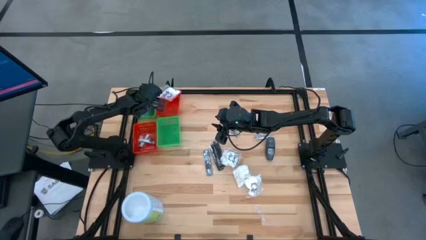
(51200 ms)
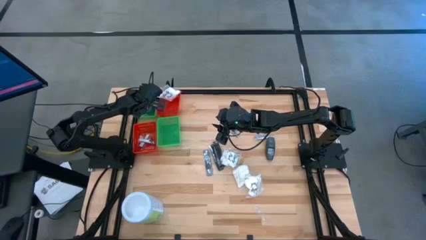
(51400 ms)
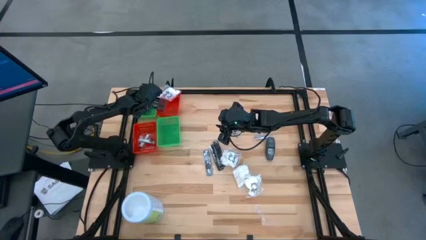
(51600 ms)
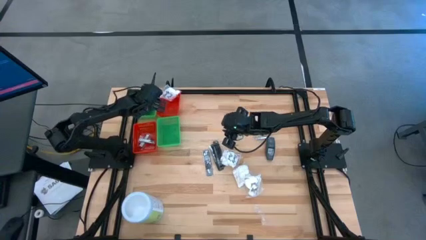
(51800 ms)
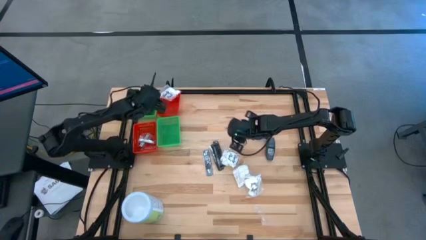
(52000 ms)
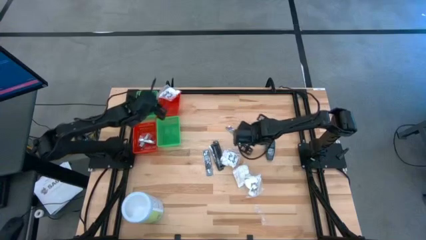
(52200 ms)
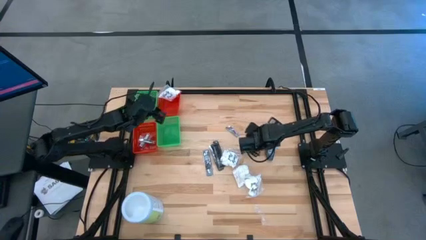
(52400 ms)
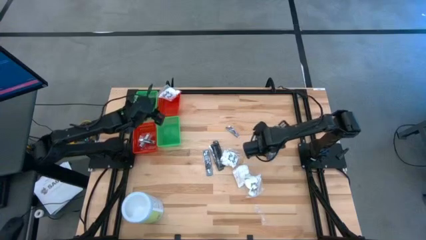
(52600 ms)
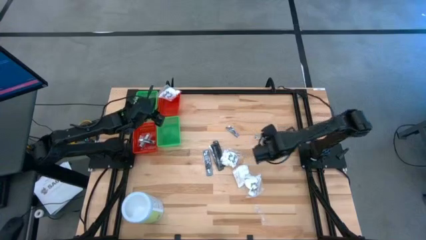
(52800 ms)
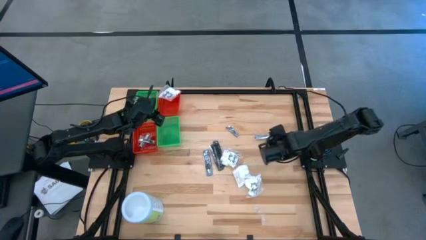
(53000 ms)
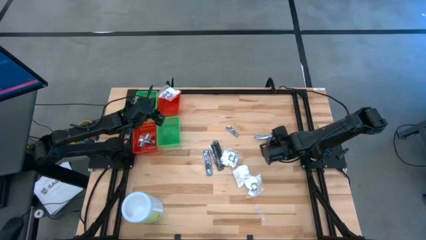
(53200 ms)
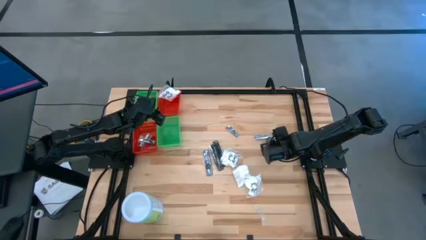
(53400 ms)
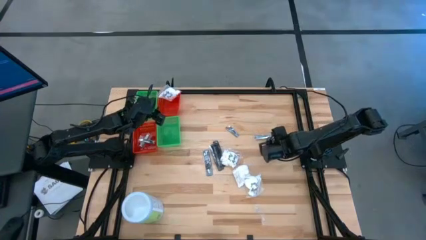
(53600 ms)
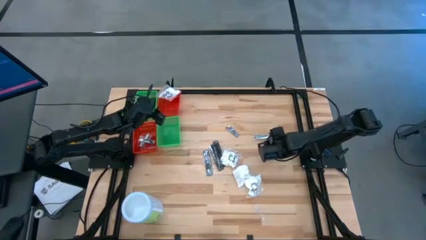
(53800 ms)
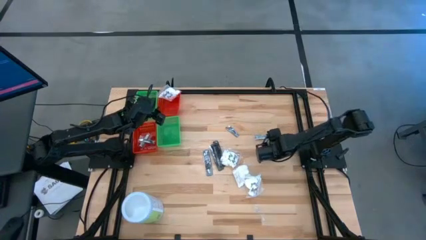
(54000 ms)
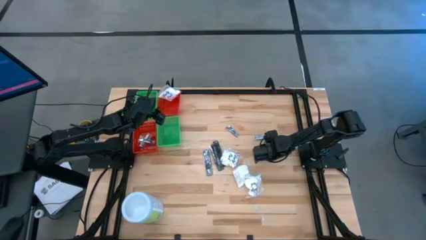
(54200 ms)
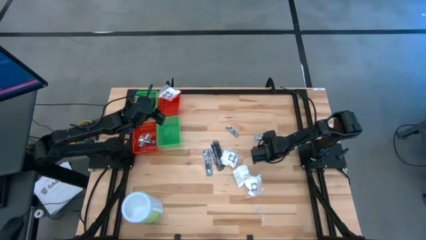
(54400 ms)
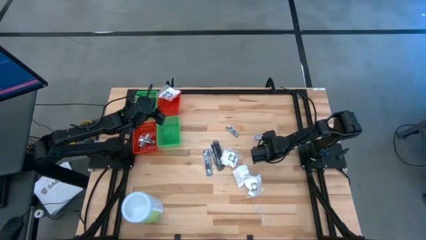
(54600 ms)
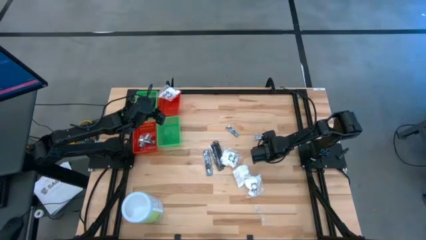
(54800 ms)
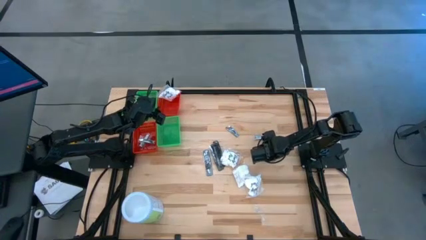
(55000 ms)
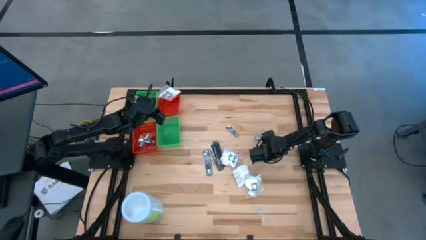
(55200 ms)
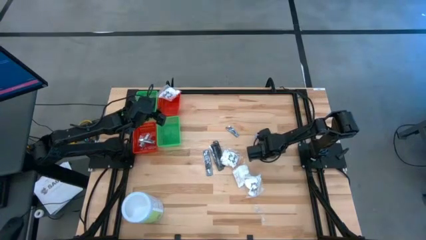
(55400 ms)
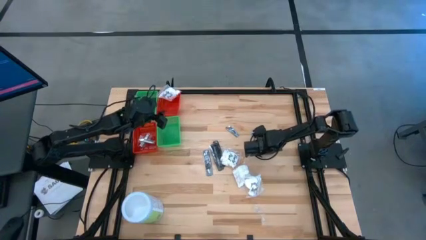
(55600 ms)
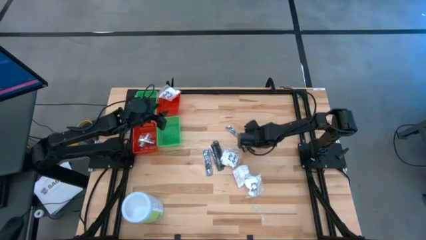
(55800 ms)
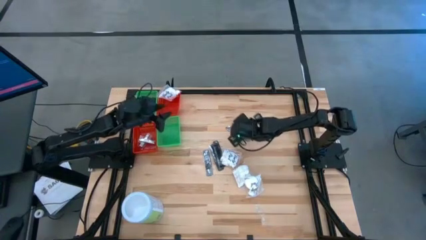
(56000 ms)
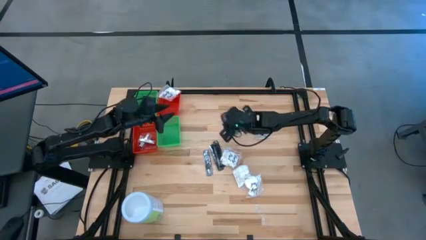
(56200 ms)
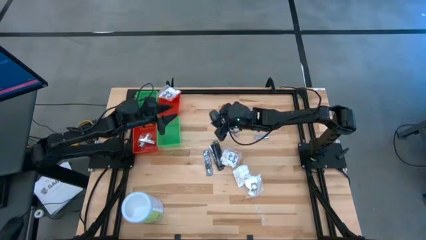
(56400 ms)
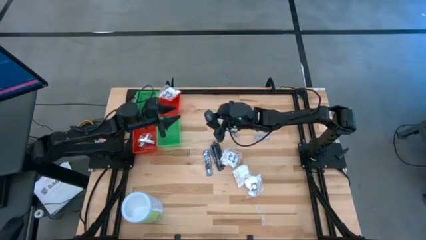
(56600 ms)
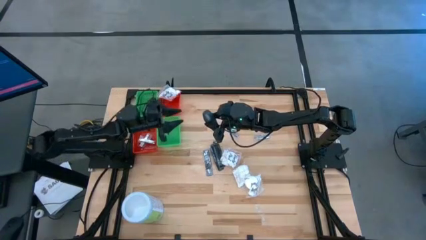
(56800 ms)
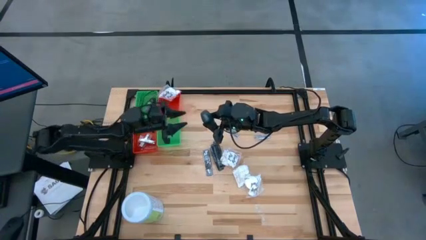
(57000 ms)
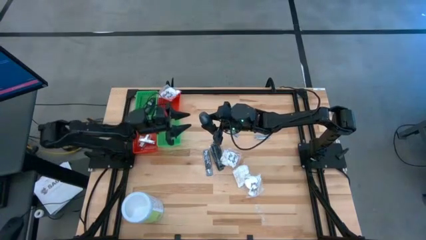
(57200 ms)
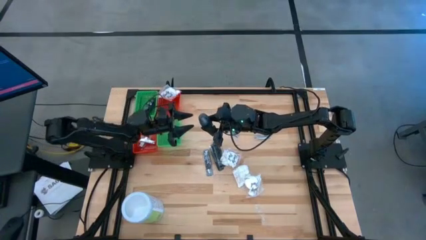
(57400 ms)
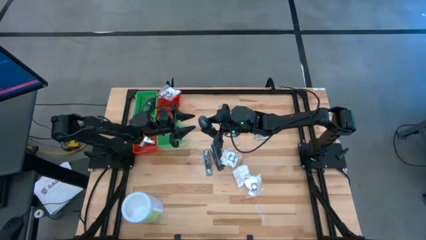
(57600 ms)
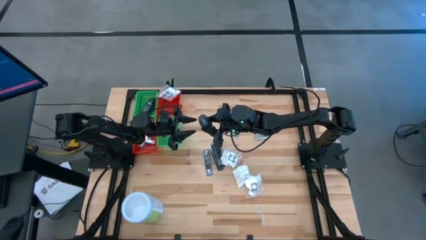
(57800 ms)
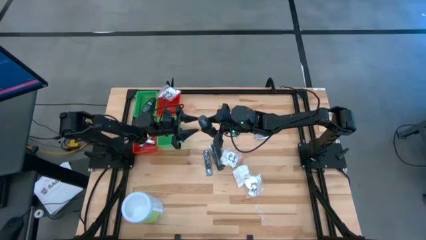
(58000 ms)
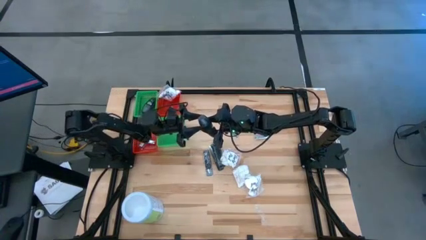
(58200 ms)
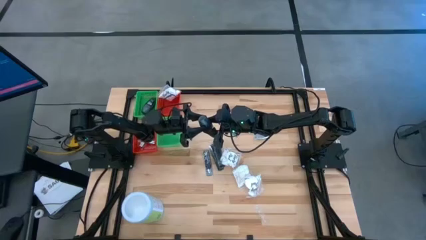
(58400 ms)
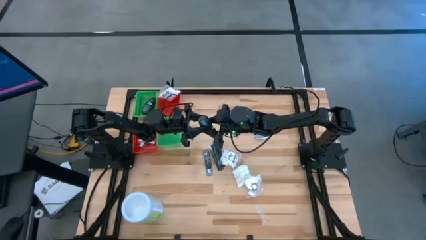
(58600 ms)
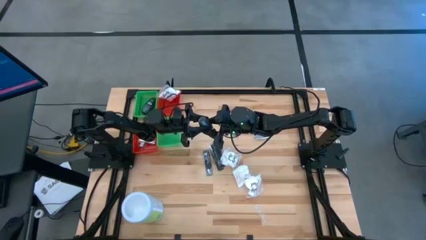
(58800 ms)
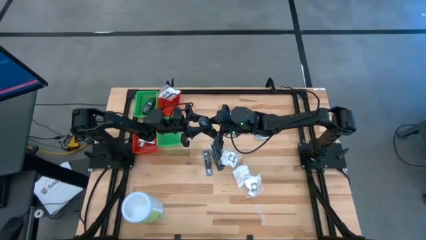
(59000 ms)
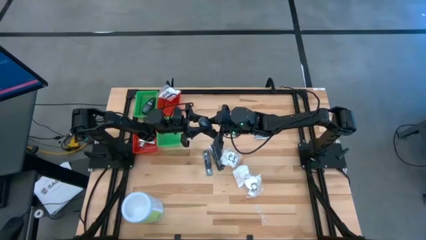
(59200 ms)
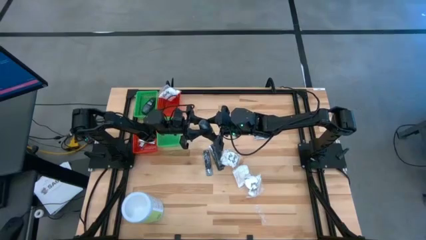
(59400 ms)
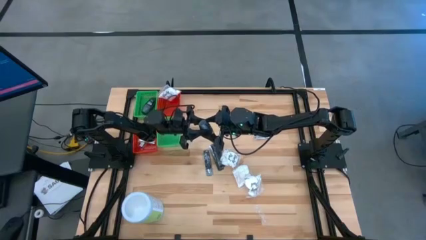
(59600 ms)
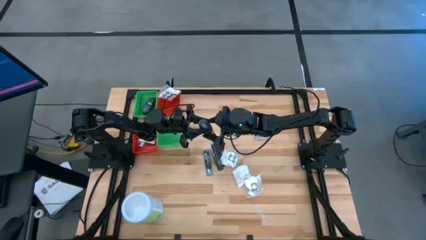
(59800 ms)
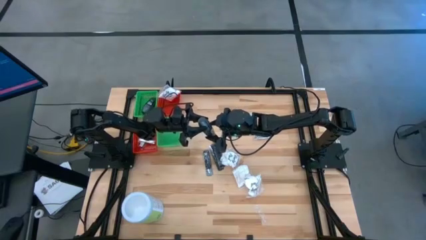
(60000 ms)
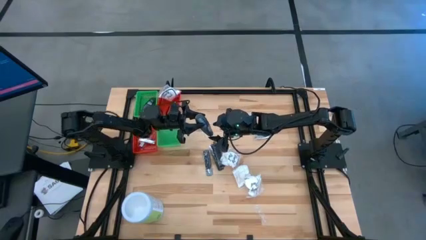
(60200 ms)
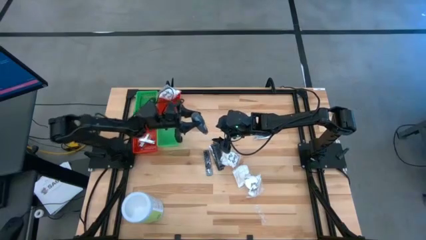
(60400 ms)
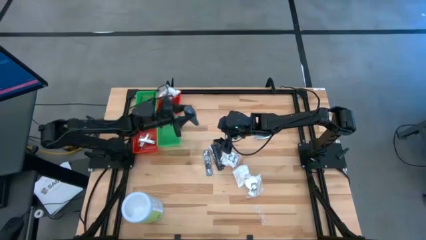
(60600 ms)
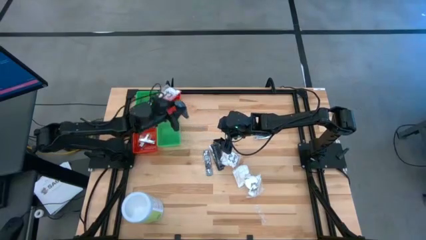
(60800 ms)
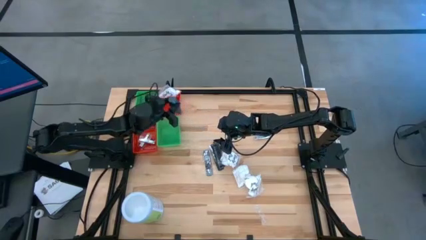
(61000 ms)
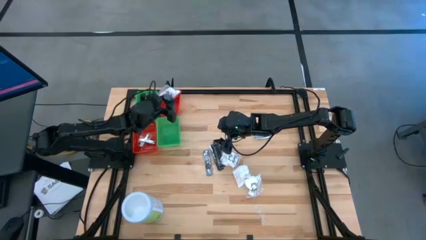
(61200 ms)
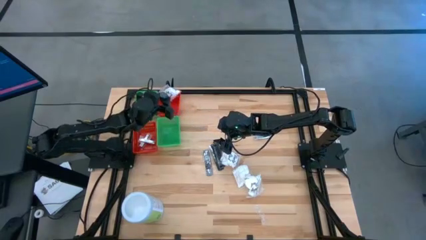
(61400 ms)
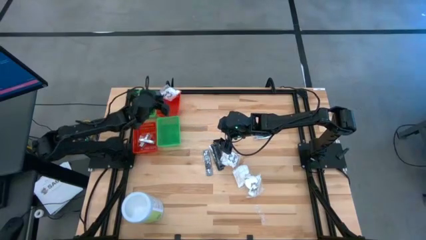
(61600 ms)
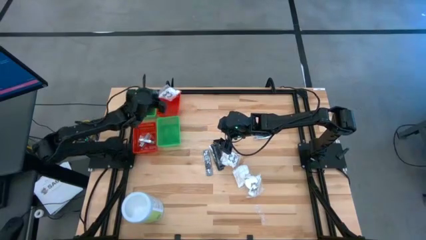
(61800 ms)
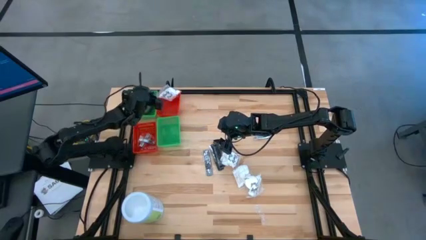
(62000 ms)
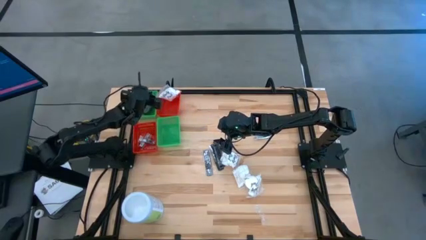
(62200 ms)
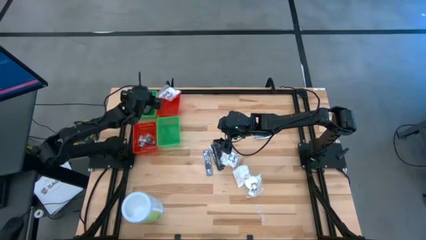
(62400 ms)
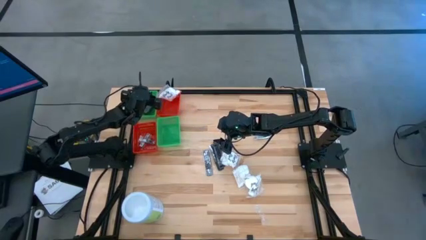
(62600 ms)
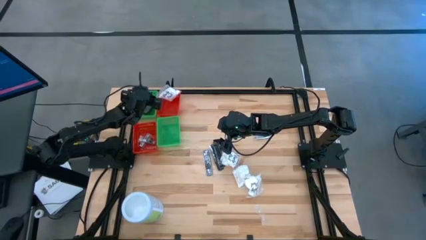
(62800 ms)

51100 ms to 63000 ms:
Task: Pick & Place Travel size toiletries
Put the gray deodorant into the top green bin
